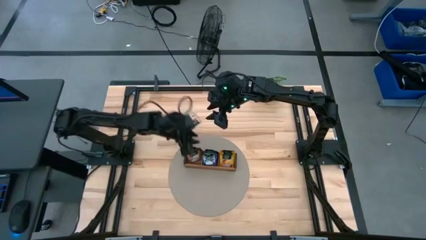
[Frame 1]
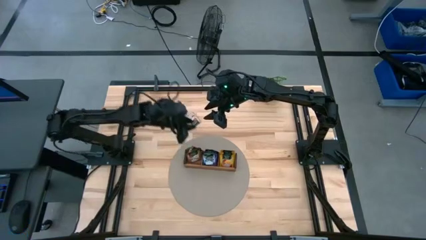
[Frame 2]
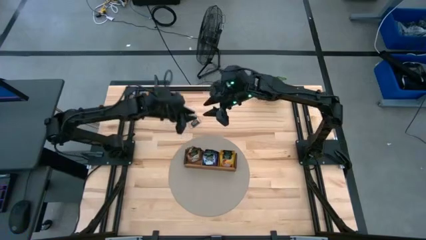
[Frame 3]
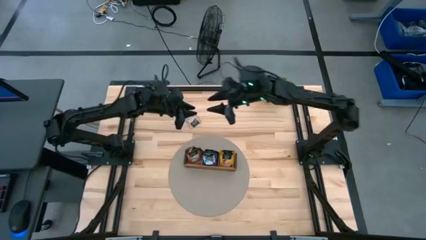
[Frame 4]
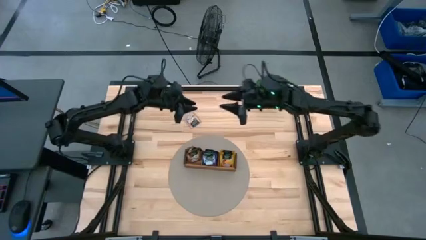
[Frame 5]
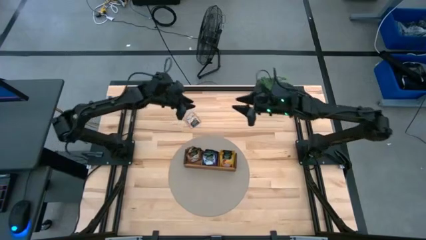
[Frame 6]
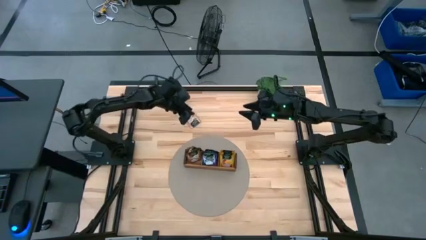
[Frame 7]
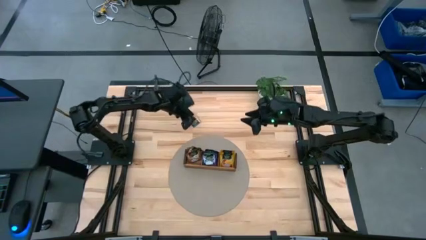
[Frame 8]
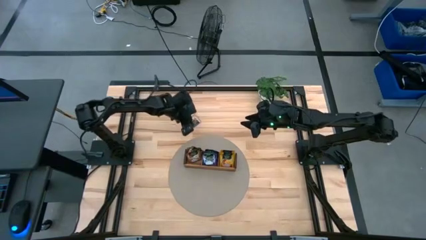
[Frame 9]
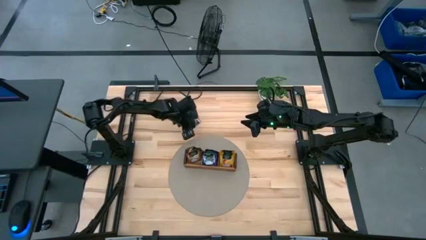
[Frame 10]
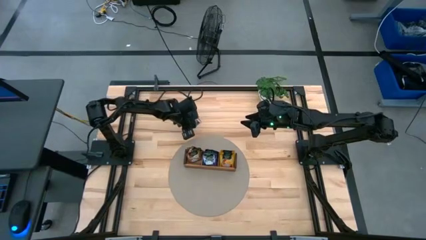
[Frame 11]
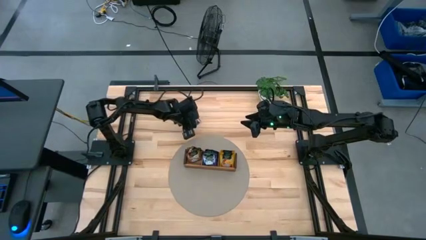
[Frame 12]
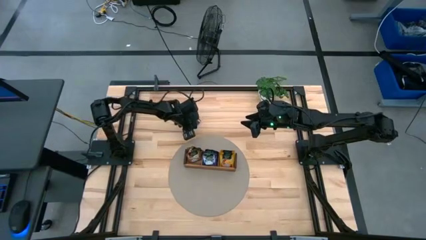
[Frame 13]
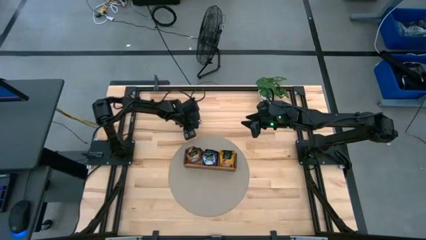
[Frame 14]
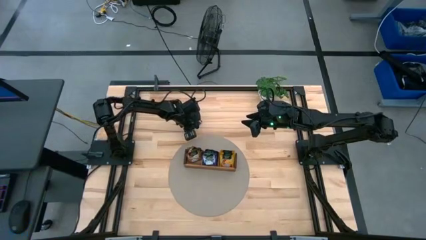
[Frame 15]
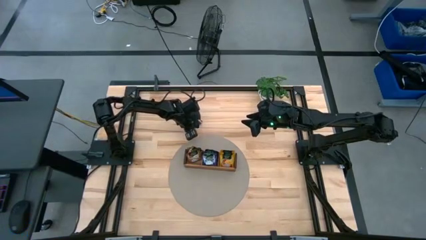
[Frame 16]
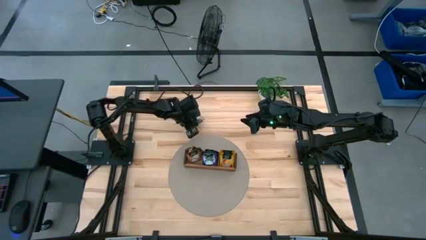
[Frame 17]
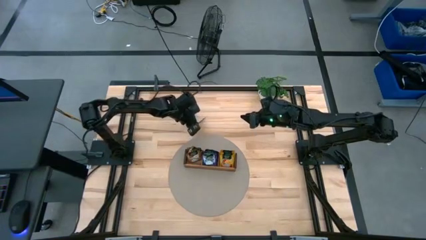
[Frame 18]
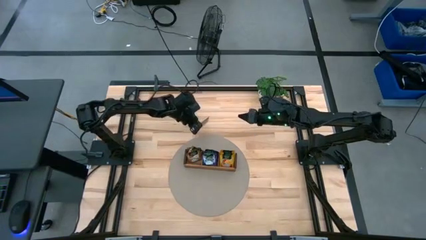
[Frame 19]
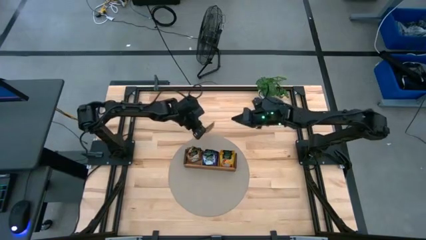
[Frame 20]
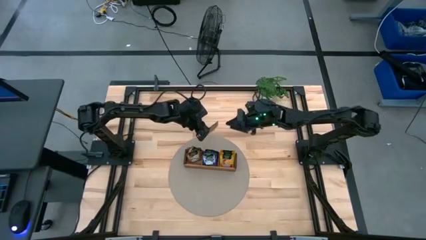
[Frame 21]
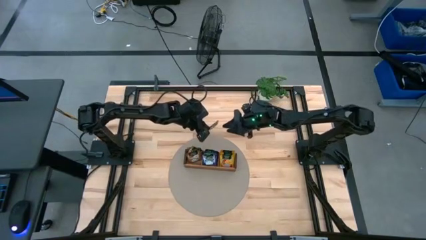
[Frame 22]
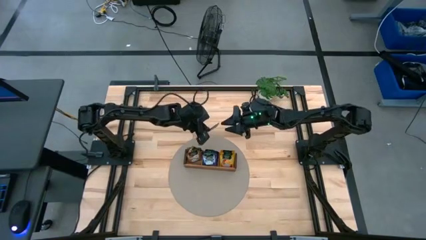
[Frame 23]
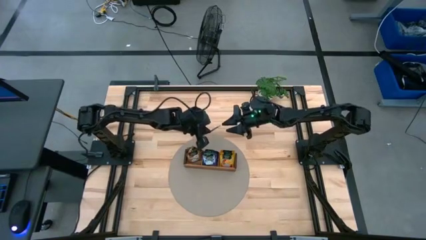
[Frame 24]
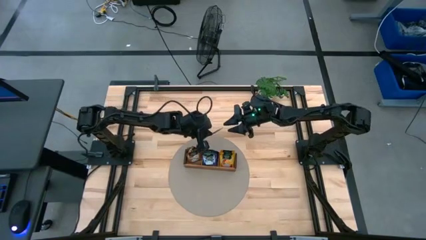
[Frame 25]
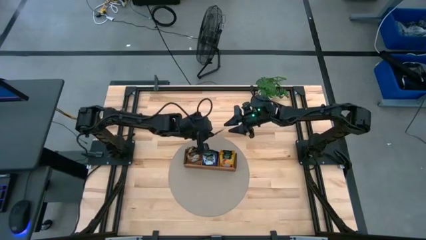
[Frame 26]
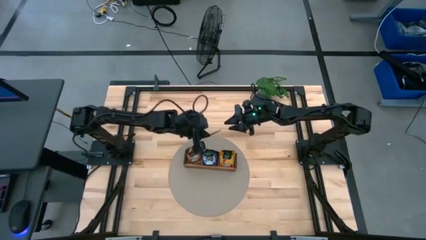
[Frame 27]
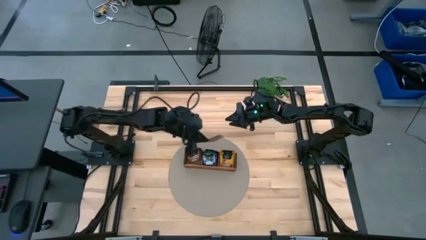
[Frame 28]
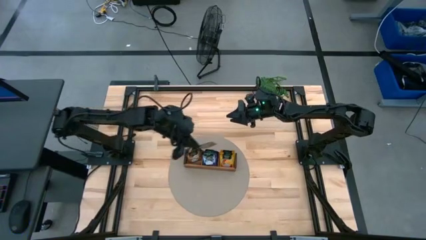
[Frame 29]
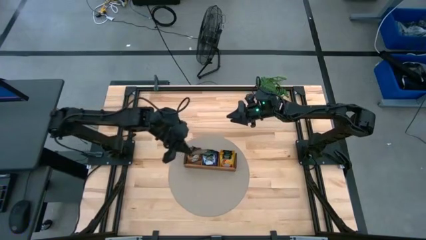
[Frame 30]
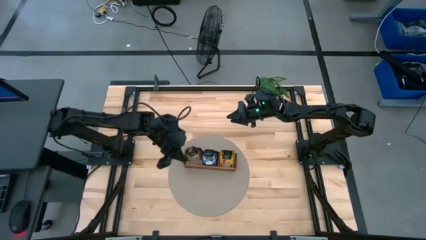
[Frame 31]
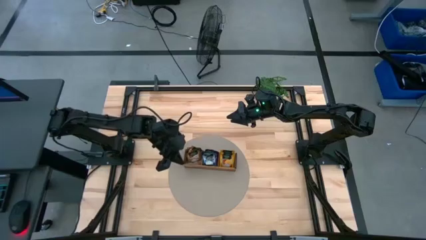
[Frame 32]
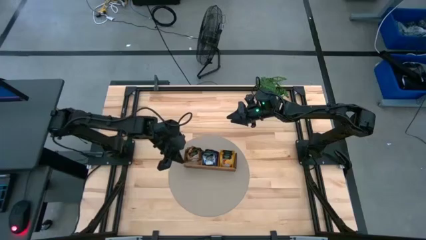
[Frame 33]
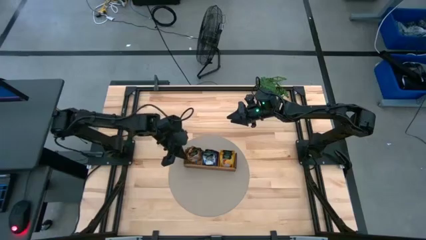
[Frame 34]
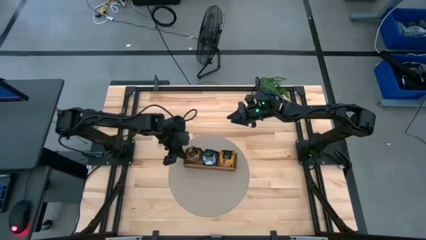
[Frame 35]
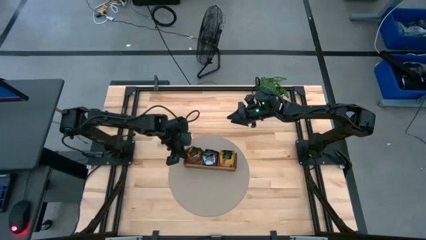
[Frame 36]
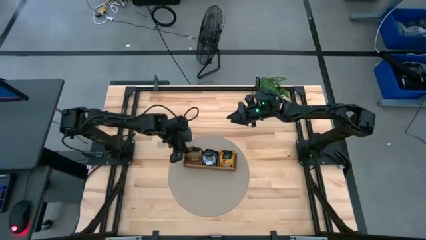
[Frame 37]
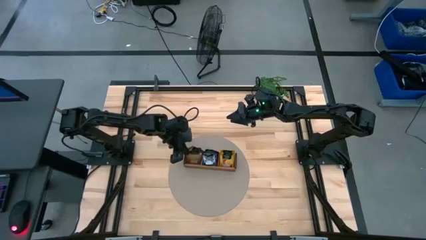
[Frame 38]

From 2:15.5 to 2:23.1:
Task: Pick & Place Tea
Put the brown tea bag into the left section of the wooden organizer

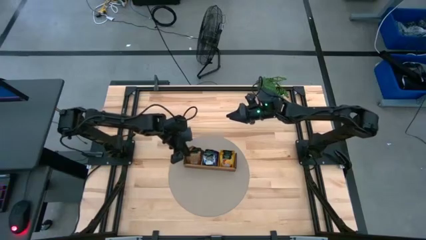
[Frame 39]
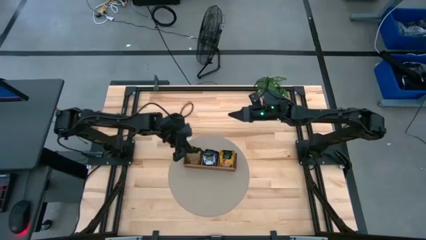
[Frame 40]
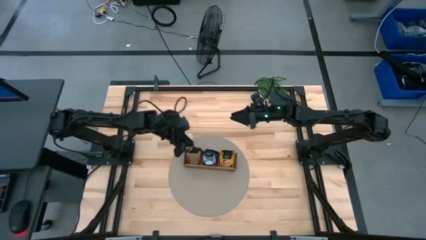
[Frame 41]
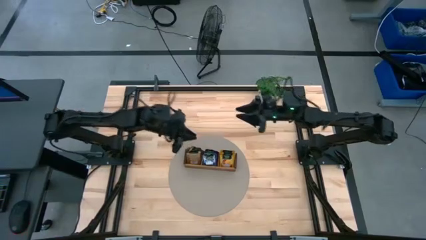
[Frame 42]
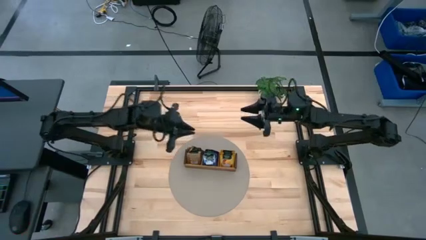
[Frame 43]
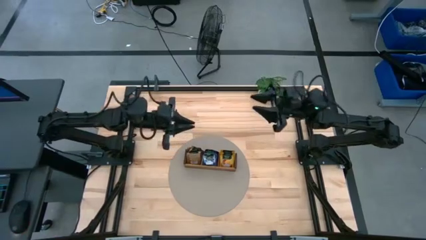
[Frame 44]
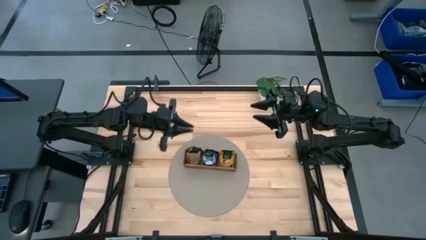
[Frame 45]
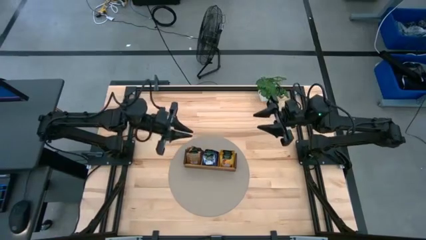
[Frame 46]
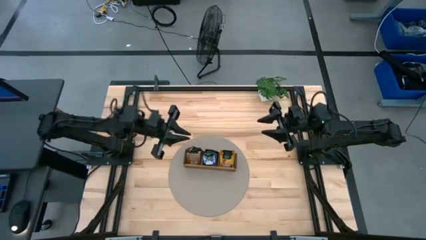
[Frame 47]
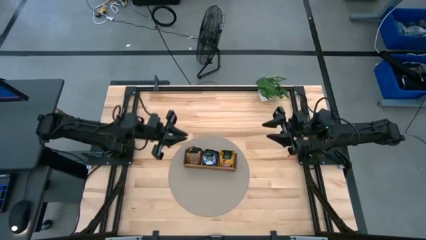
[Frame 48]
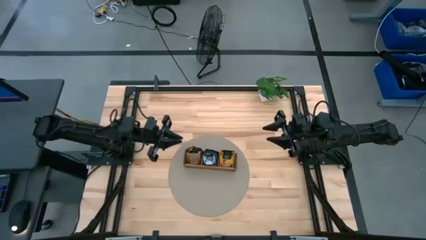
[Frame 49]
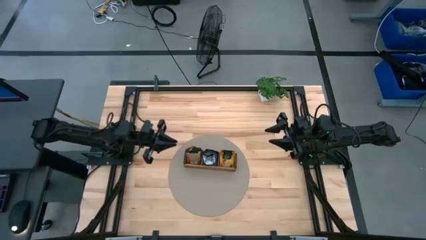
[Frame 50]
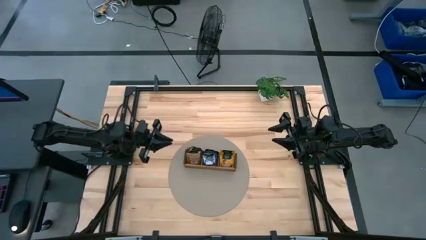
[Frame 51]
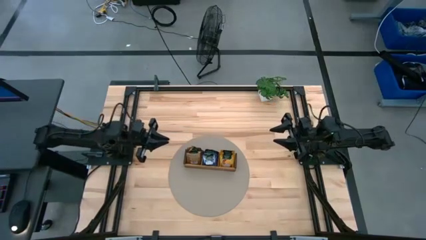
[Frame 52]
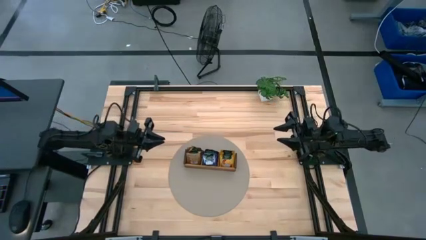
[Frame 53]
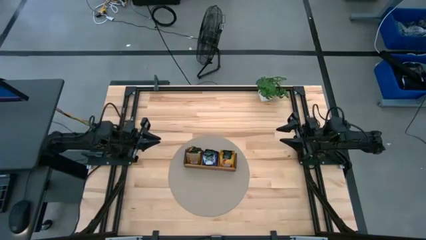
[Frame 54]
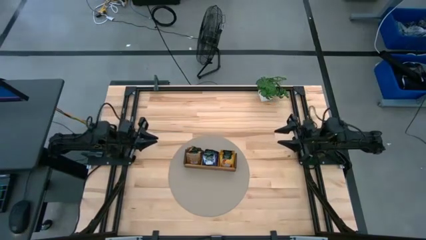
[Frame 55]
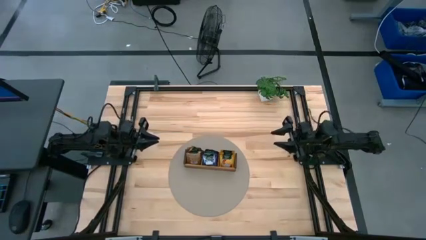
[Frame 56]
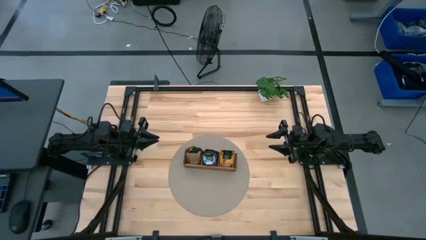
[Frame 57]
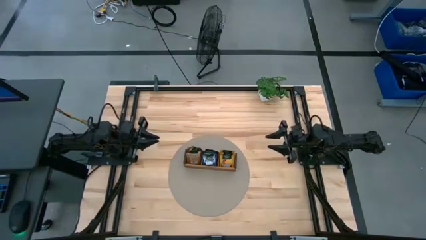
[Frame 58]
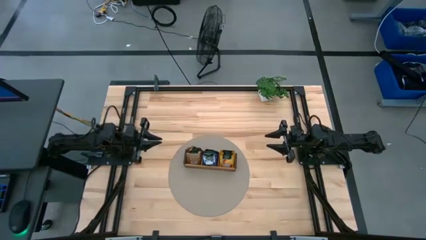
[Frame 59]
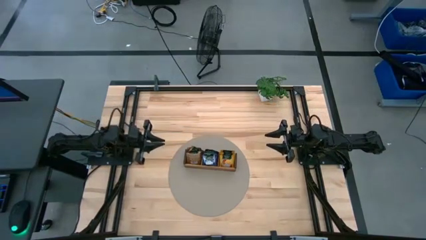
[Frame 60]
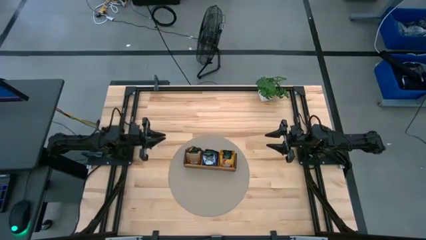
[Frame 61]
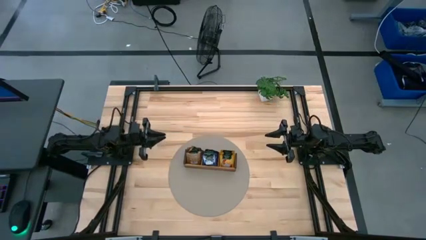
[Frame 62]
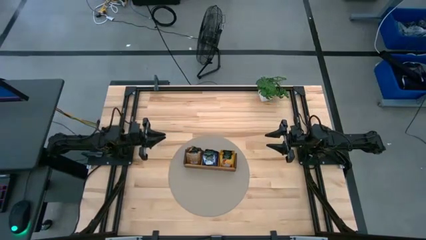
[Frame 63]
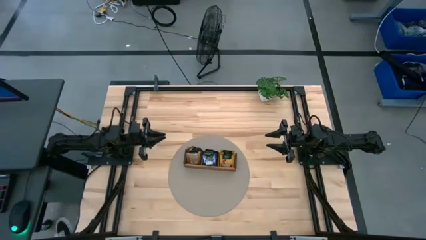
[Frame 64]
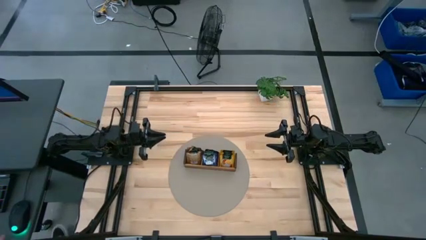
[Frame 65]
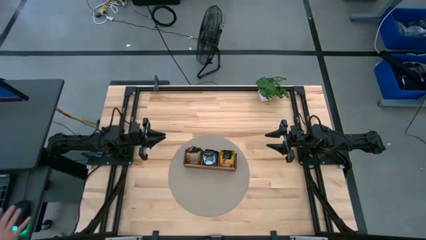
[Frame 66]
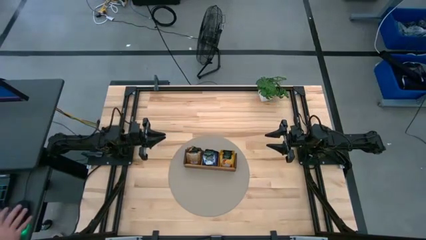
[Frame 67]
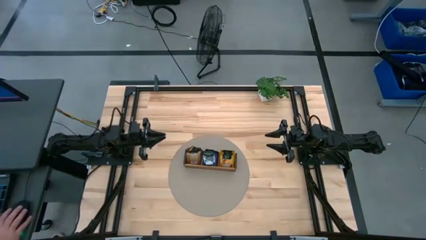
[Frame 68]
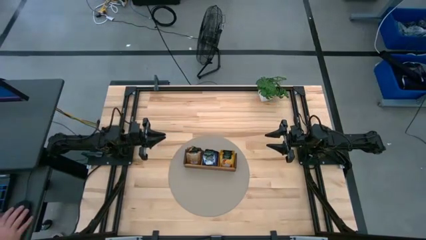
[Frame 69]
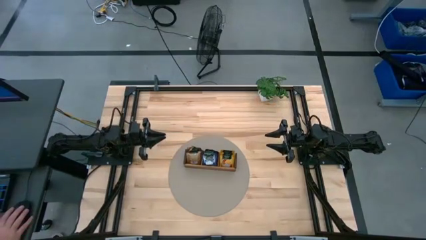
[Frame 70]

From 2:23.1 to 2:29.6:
Return to Home Position

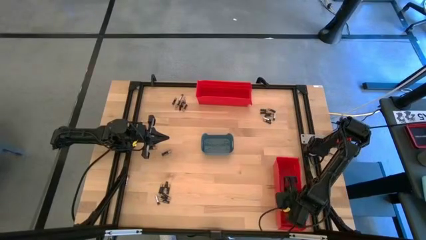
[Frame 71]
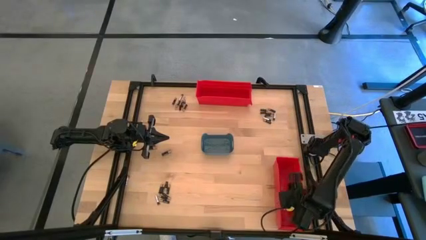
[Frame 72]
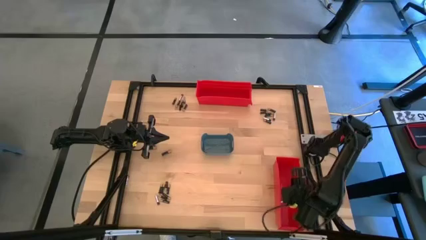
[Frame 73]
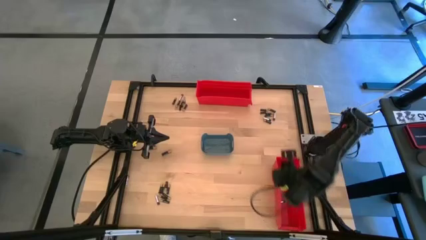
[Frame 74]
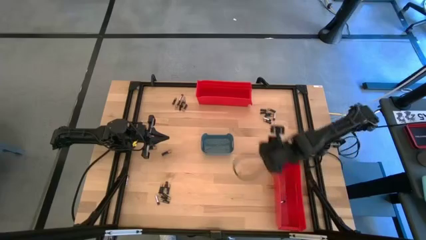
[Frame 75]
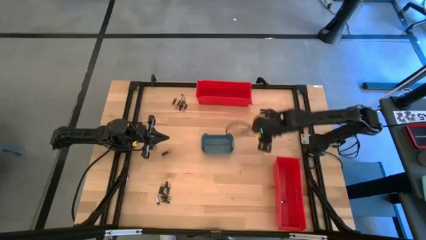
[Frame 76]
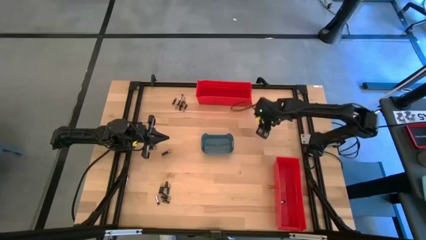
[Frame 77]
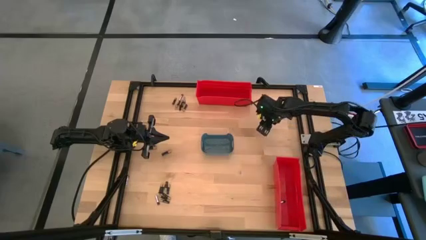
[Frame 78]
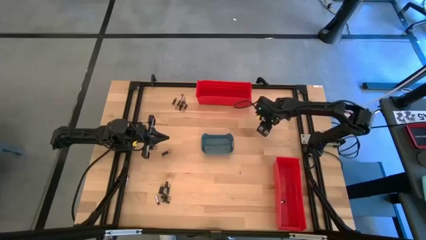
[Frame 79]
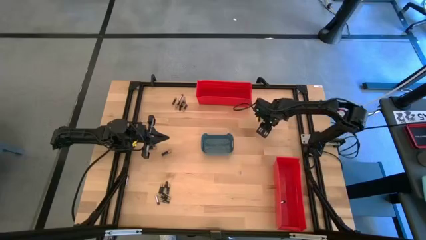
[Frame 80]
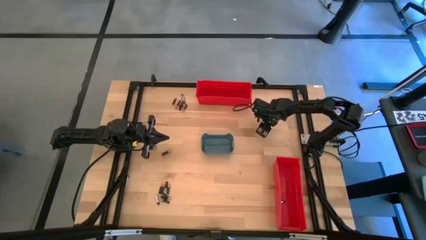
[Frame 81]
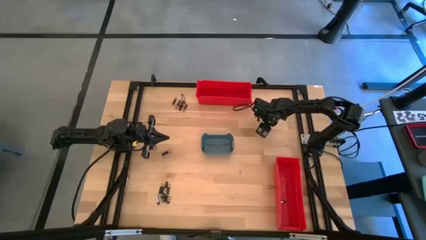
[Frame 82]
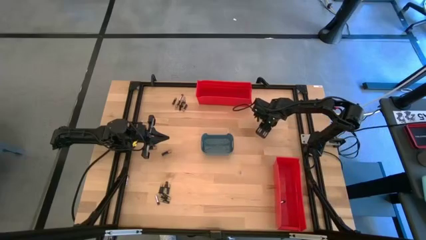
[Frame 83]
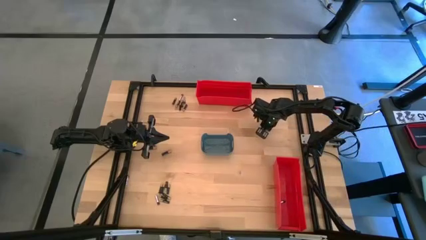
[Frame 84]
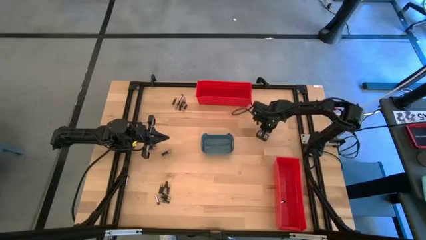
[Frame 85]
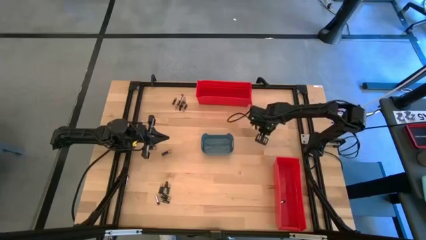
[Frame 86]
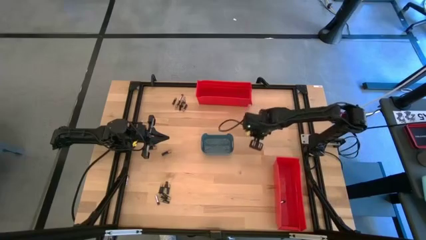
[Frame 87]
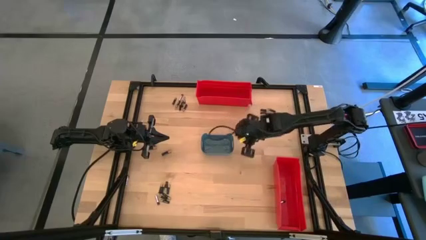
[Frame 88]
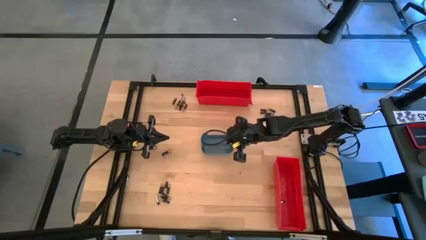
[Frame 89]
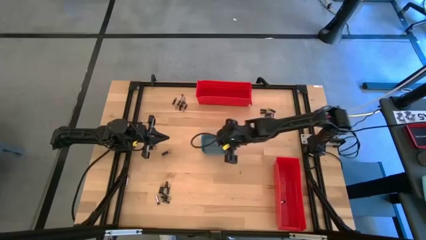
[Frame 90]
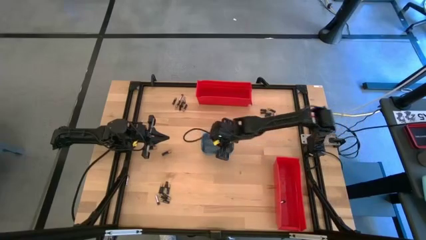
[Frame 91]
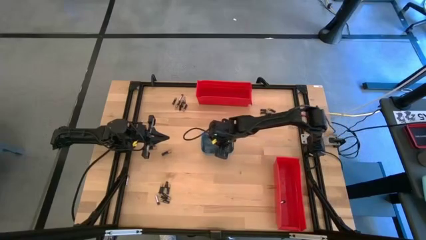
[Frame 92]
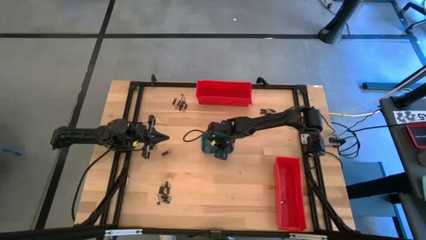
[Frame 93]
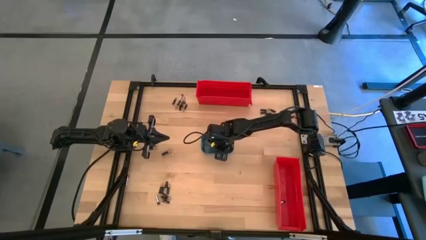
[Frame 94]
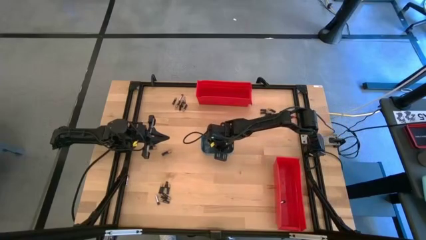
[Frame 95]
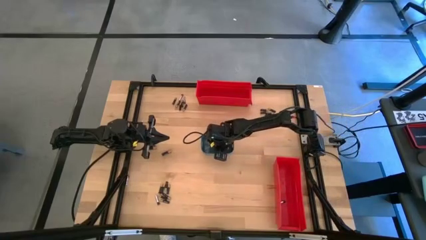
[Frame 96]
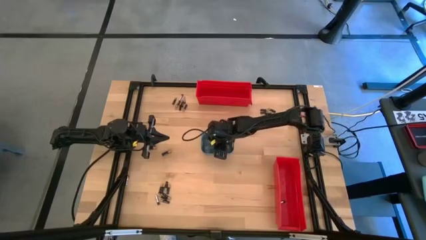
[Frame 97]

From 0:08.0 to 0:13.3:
Task: Sort batteries
Put the black battery into the blue bin
